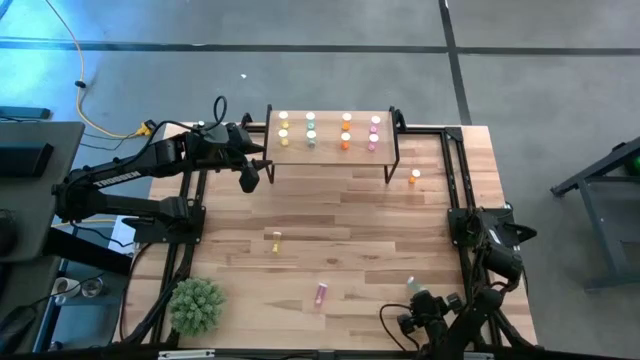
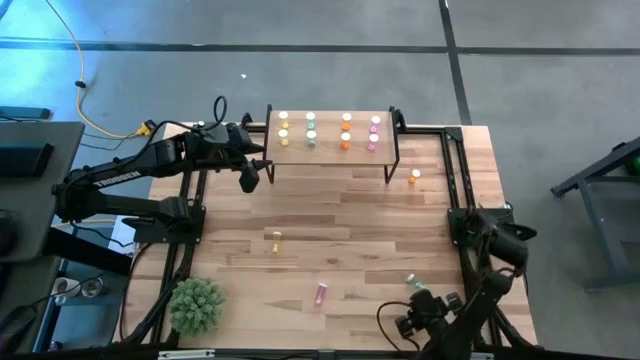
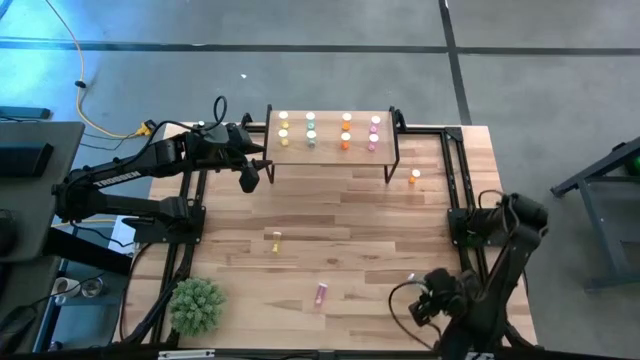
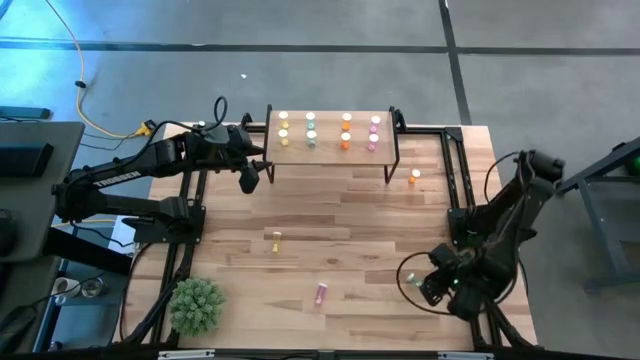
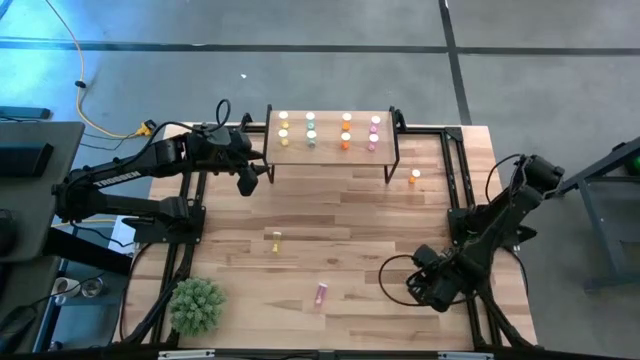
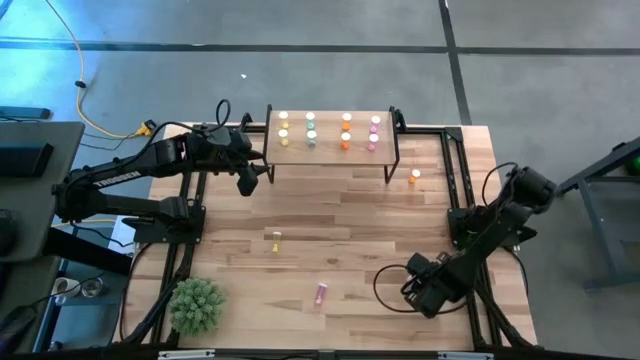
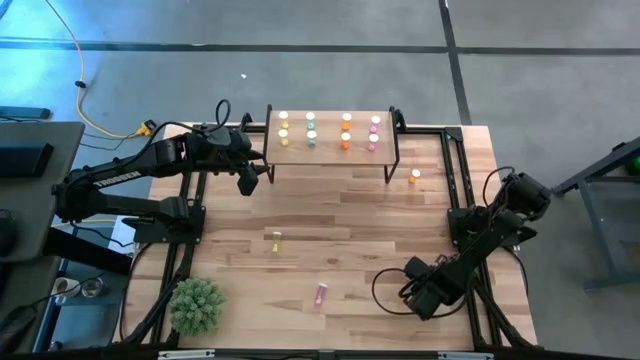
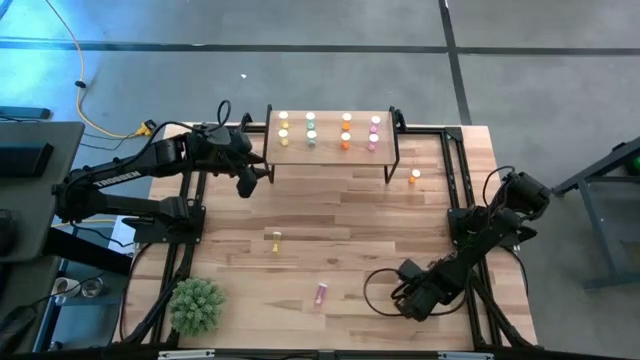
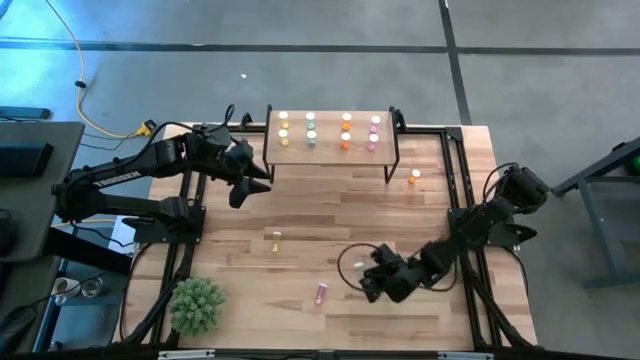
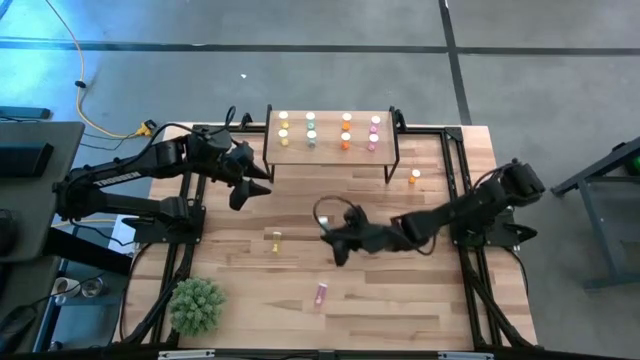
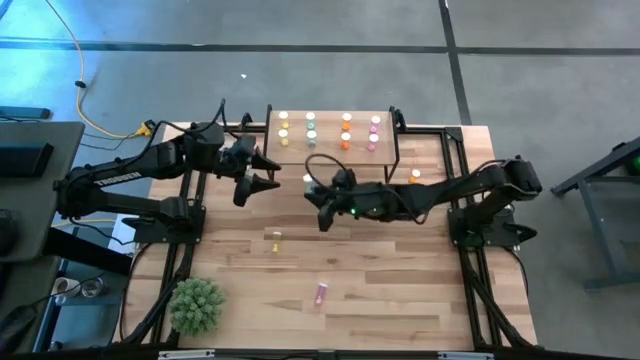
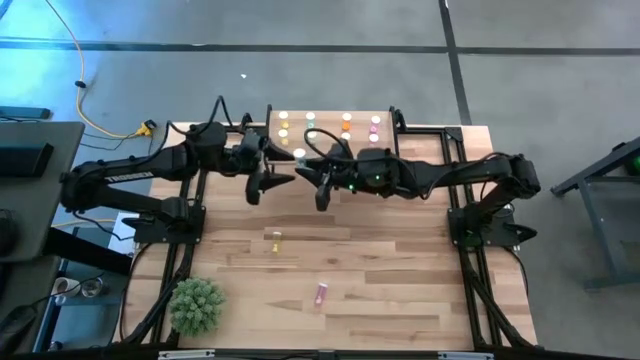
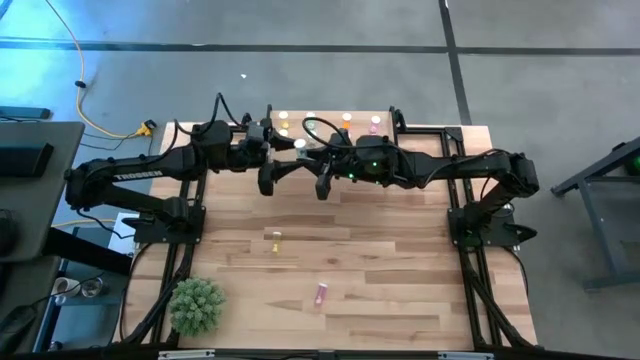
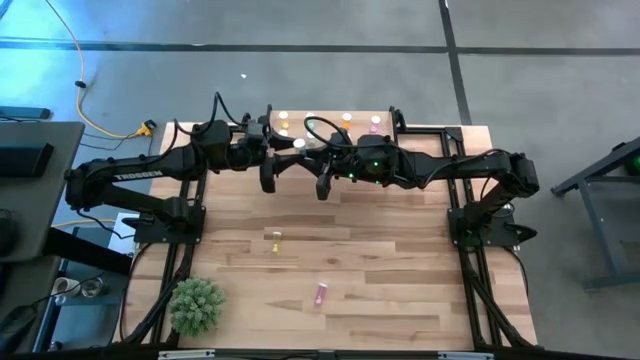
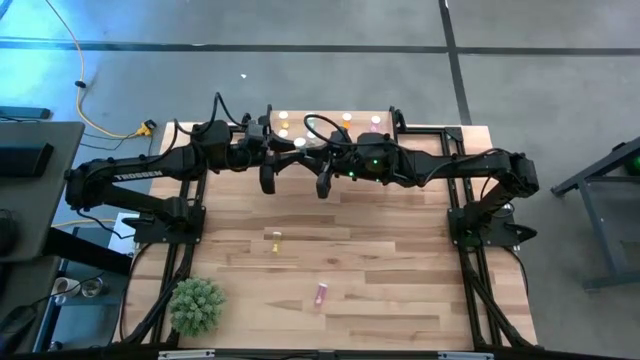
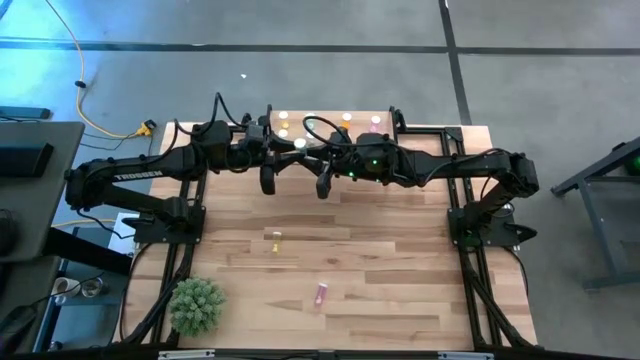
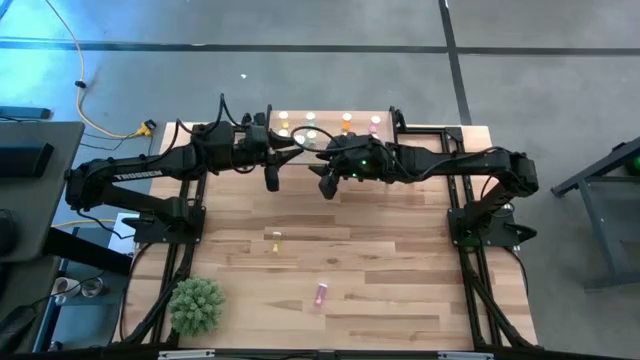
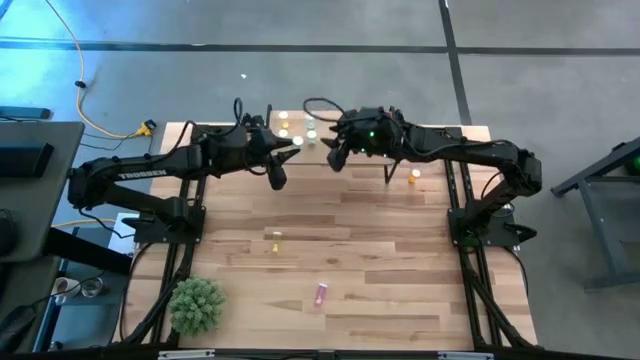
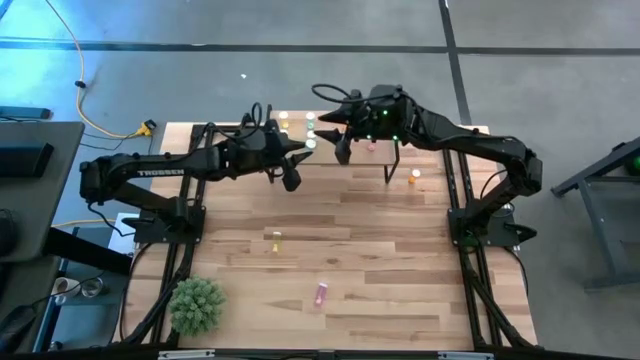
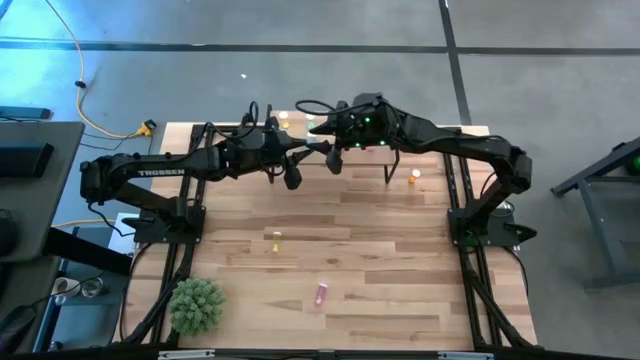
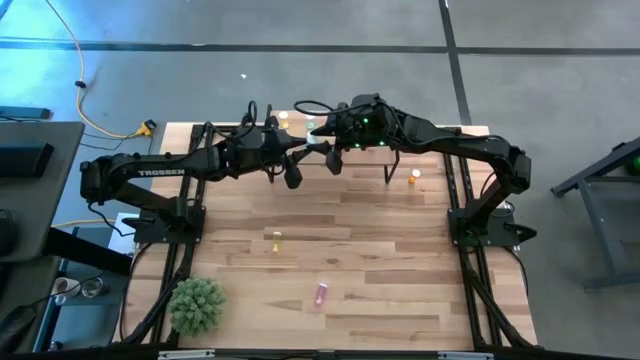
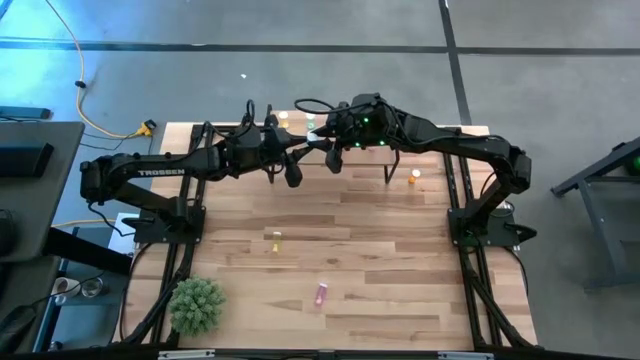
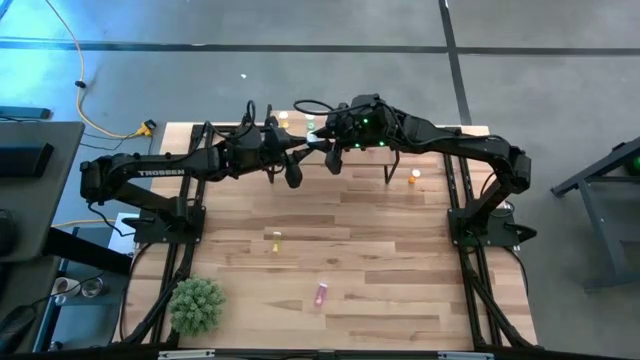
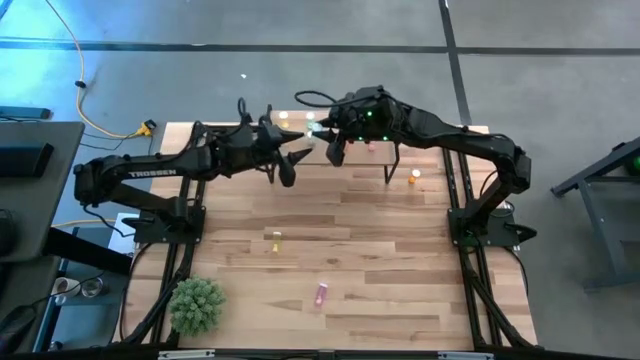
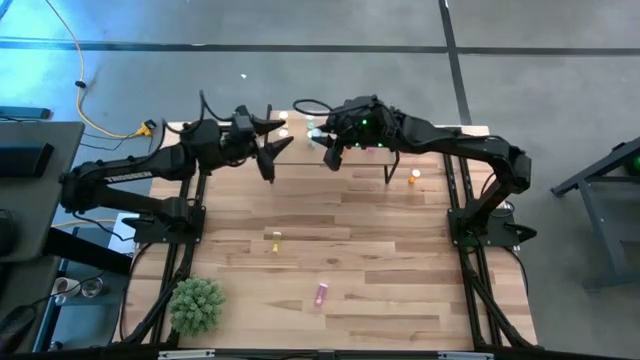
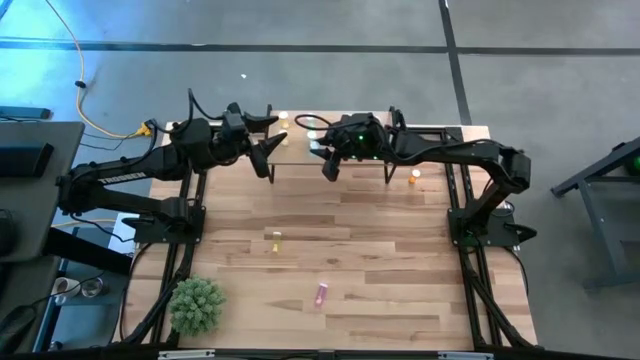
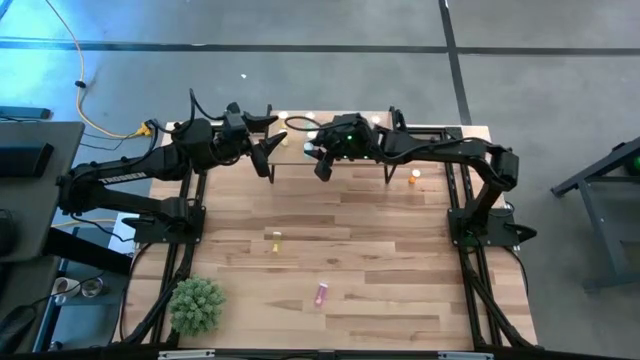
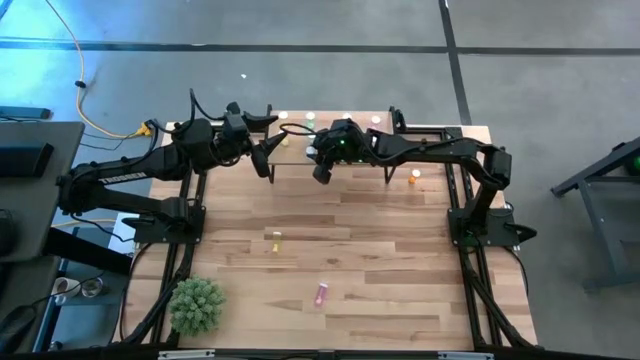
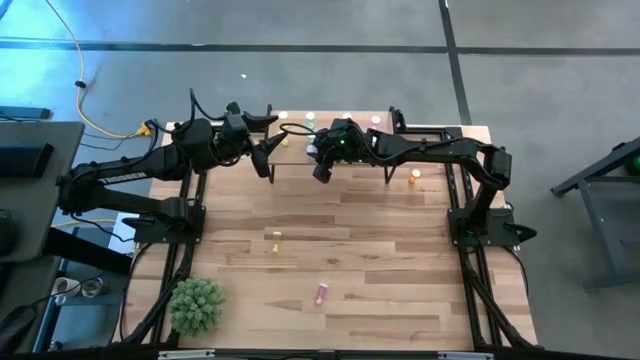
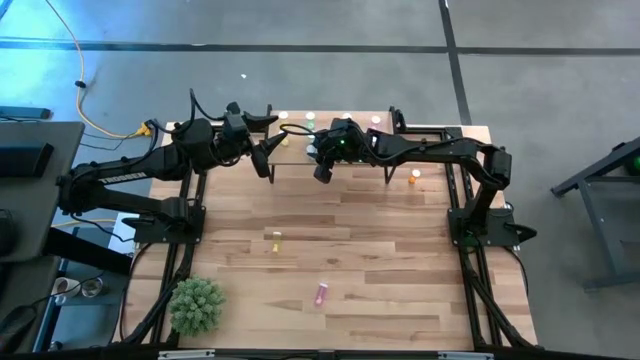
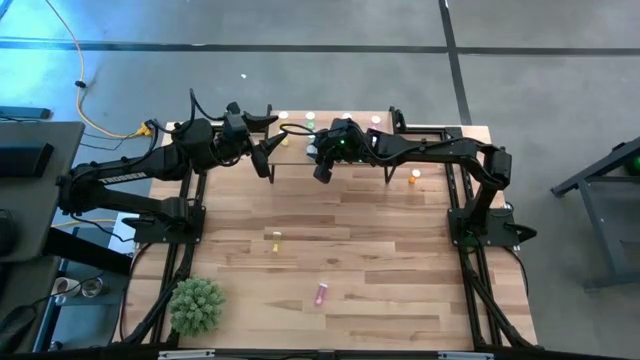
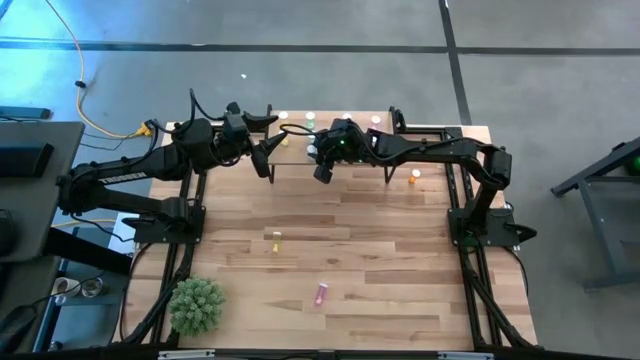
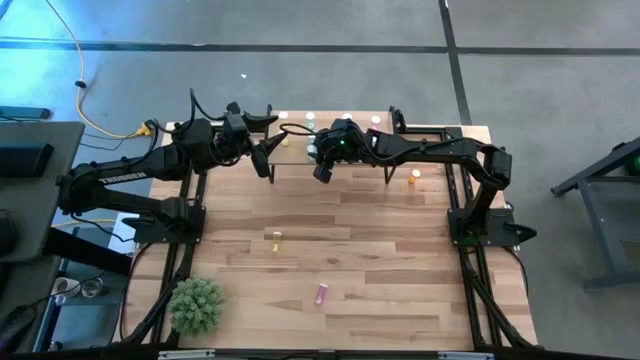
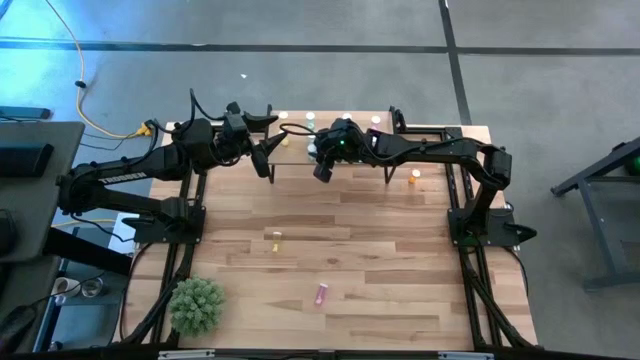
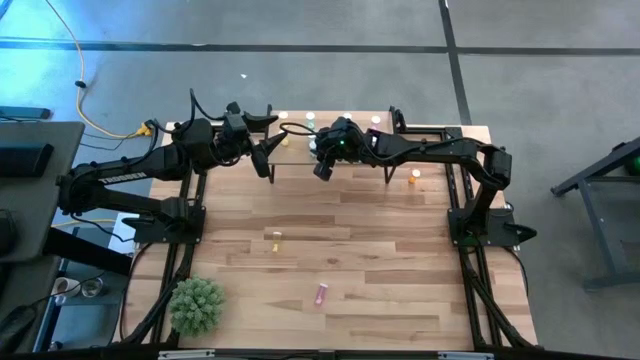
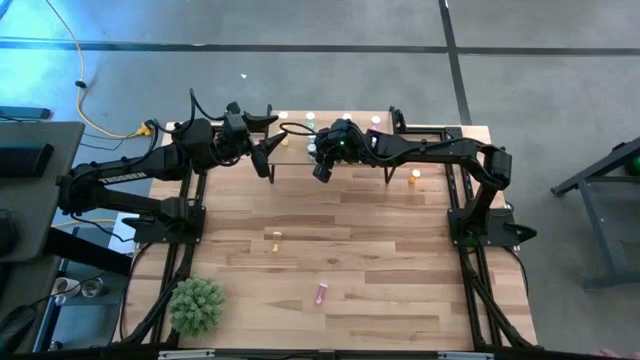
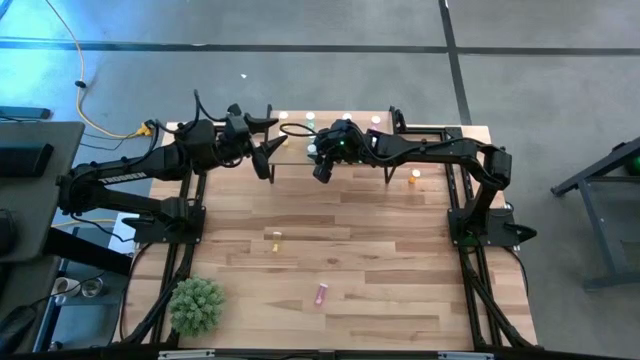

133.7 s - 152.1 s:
Task: Pick and place medicine bottles onto shelf by color
Put the blue pill bottle on the shelf aligned with the other blue pill bottles

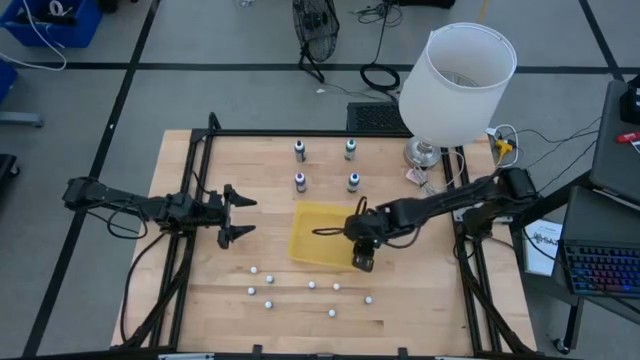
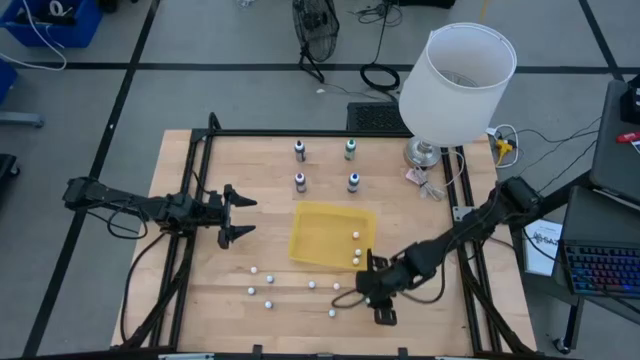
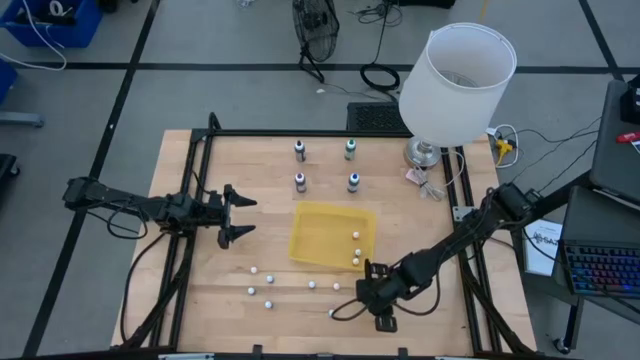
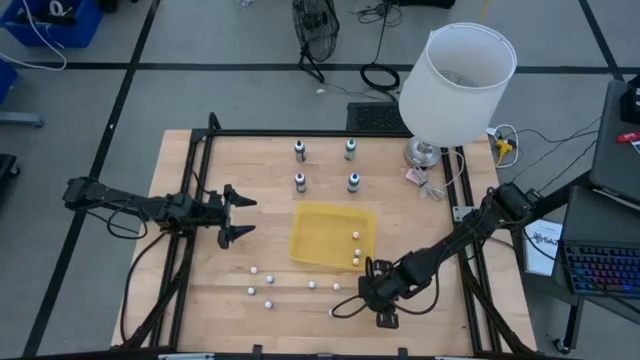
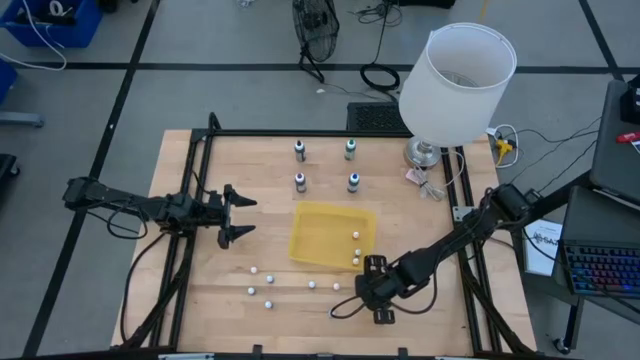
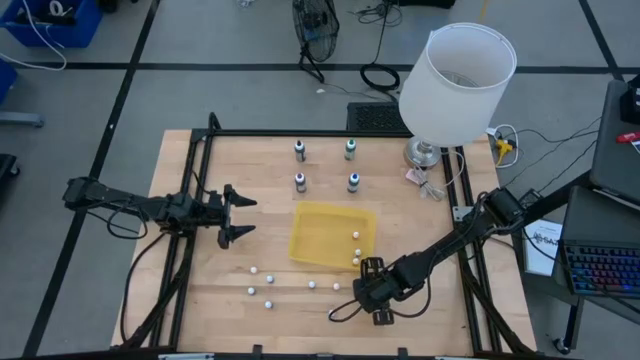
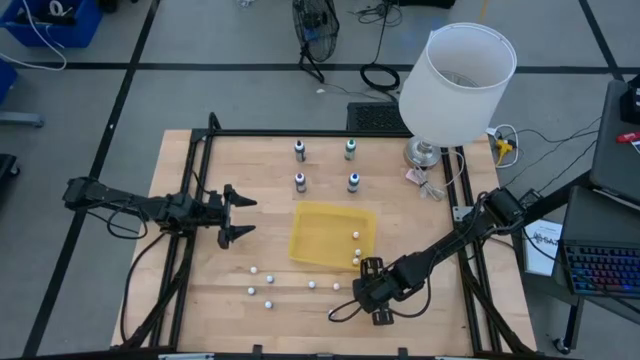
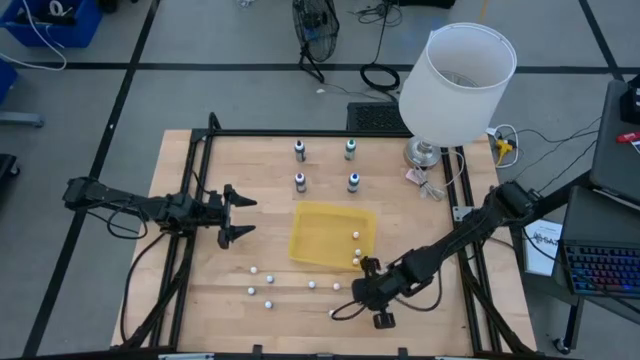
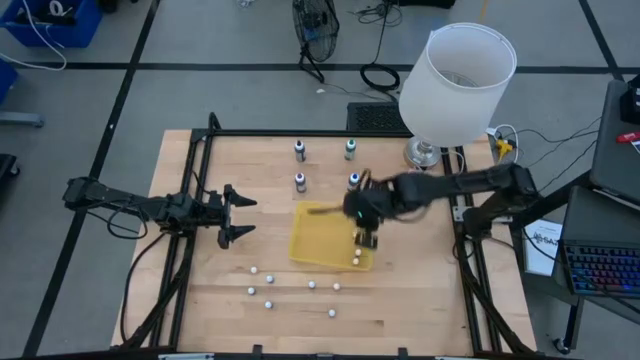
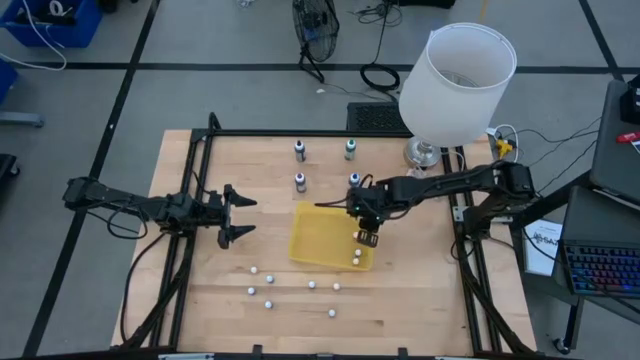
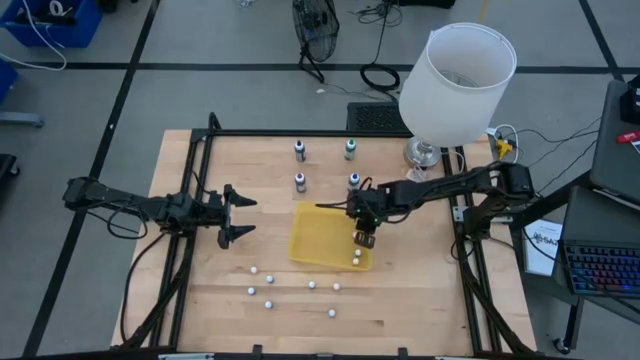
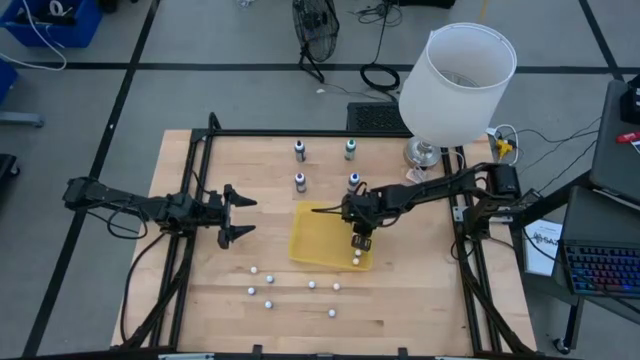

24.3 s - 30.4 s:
Task: Pick & Place food coloring
Put the small blue food coloring bottle into the yellow container
